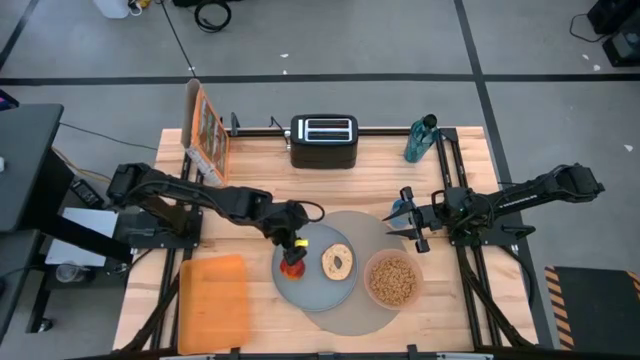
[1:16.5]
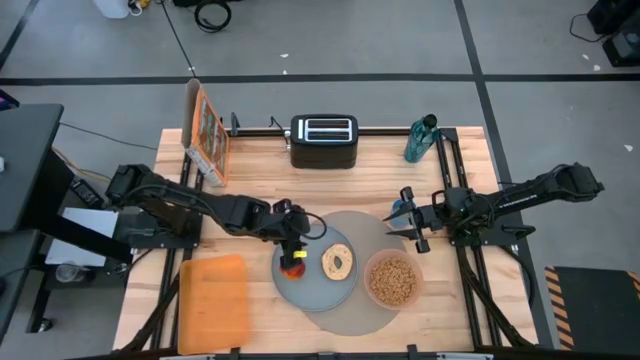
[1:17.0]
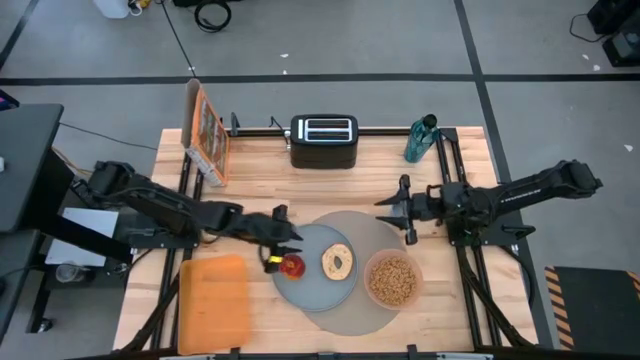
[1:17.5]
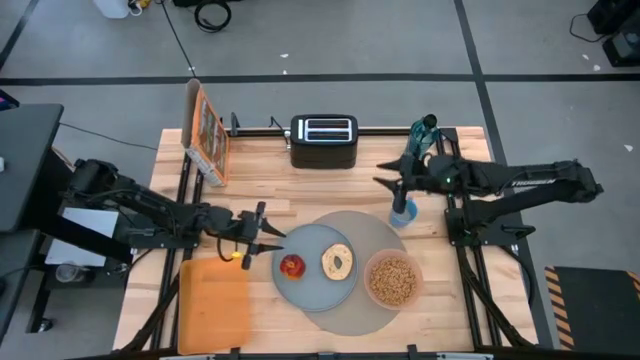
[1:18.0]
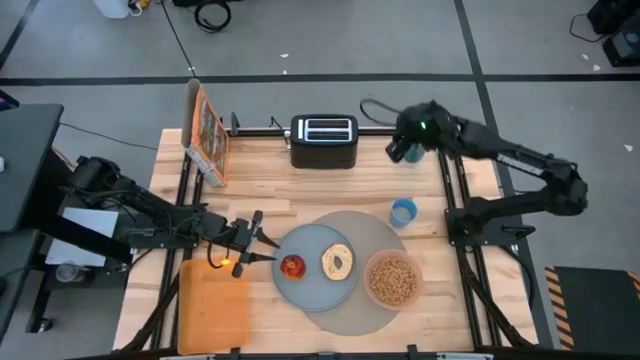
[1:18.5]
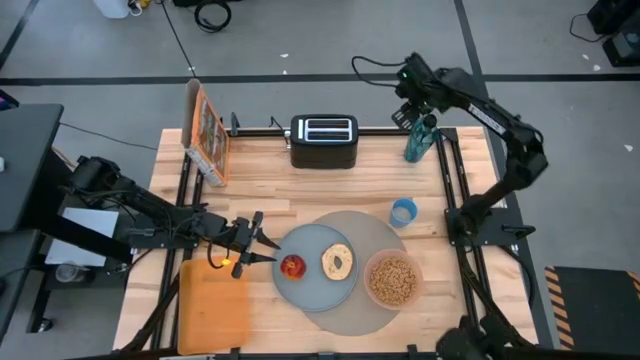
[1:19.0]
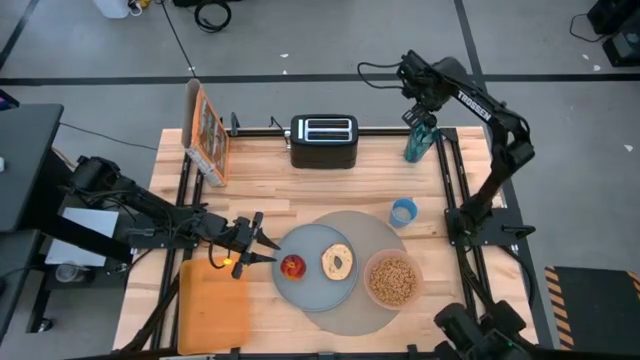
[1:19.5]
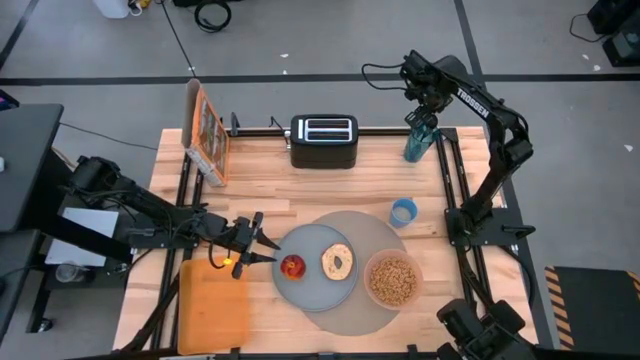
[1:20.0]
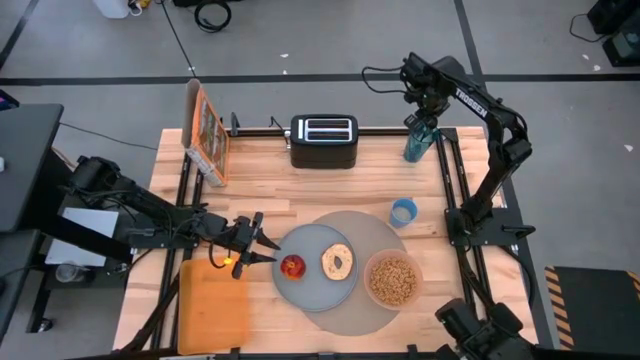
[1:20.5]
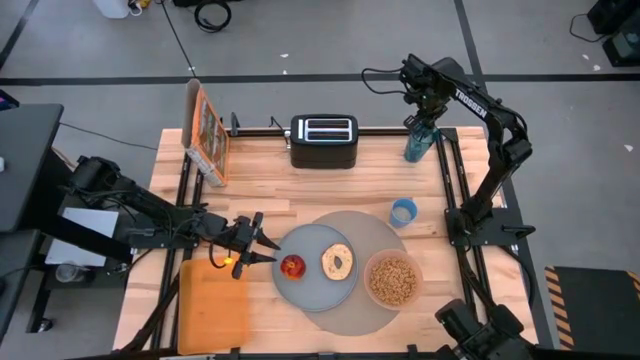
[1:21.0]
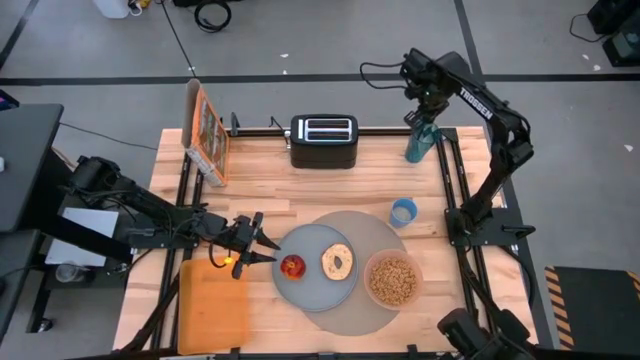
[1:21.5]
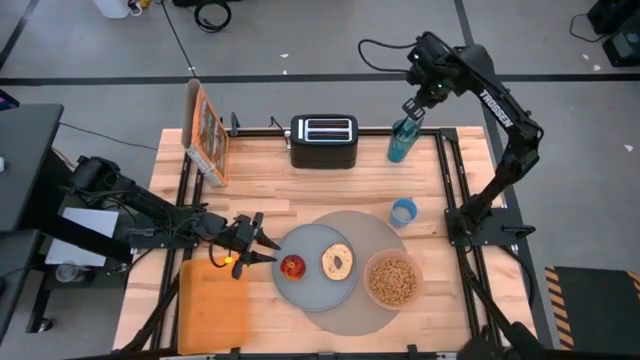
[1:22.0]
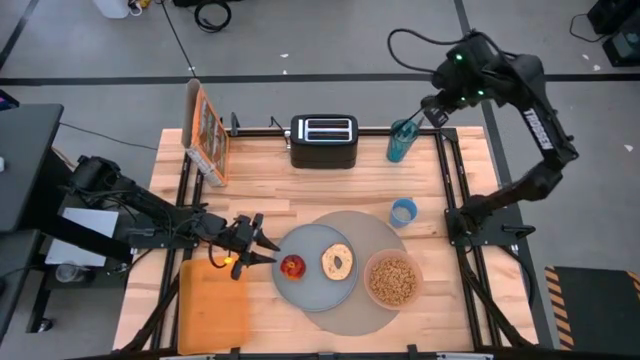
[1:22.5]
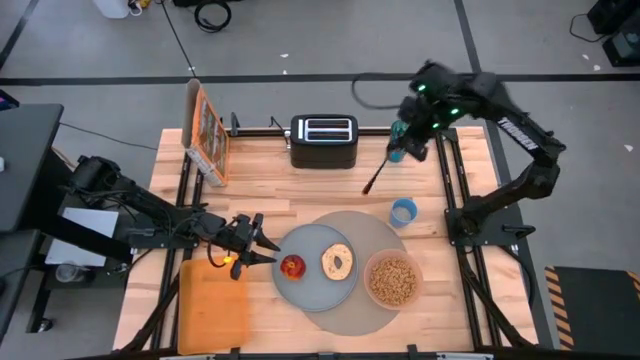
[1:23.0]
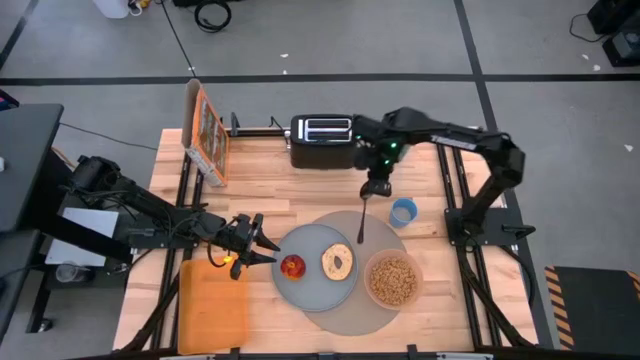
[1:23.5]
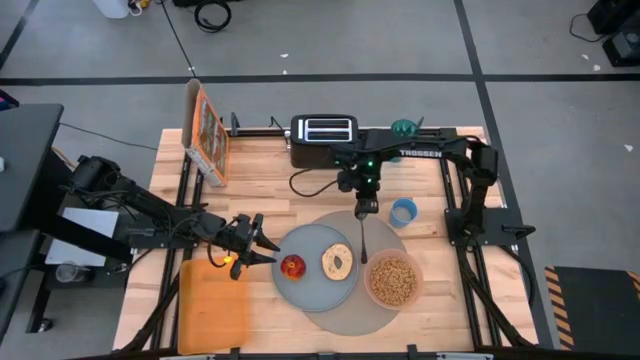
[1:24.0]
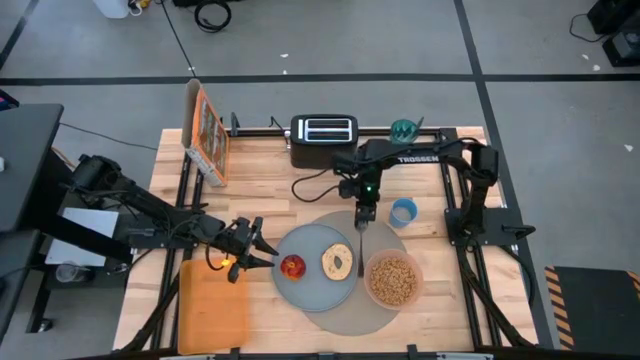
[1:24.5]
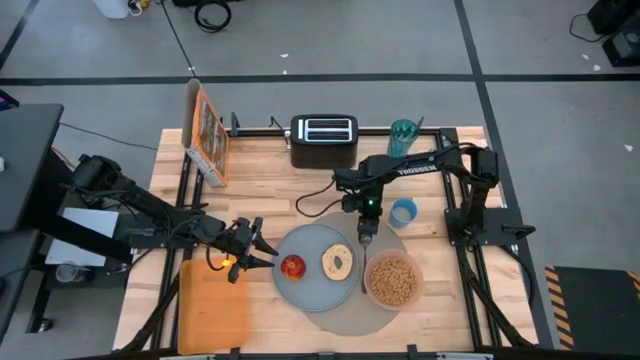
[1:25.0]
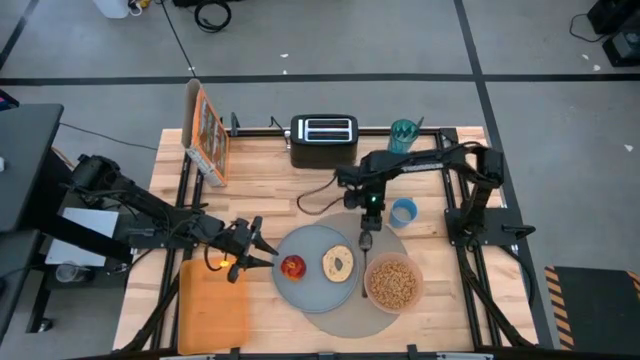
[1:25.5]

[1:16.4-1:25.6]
Task: Arrange a breakfast setting
Put the spoon in the brown table mat to the right of the grey plate

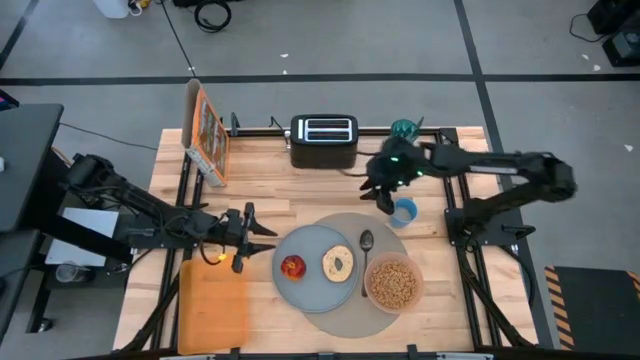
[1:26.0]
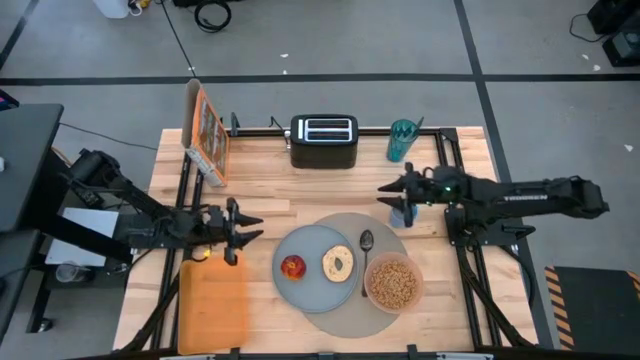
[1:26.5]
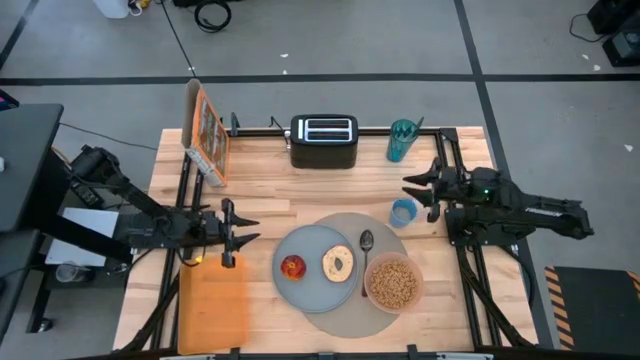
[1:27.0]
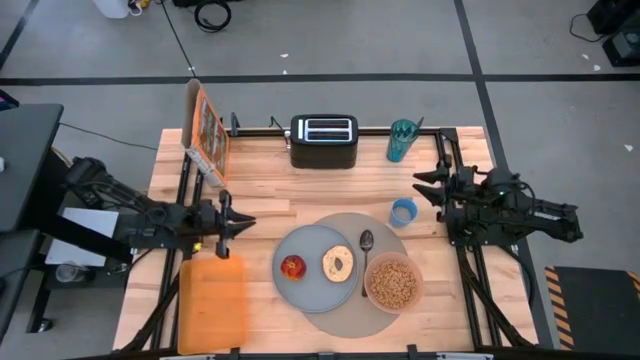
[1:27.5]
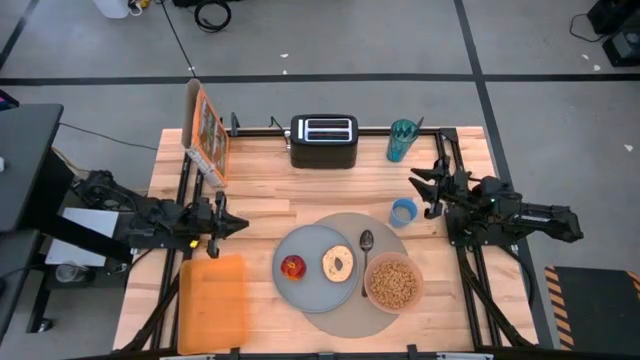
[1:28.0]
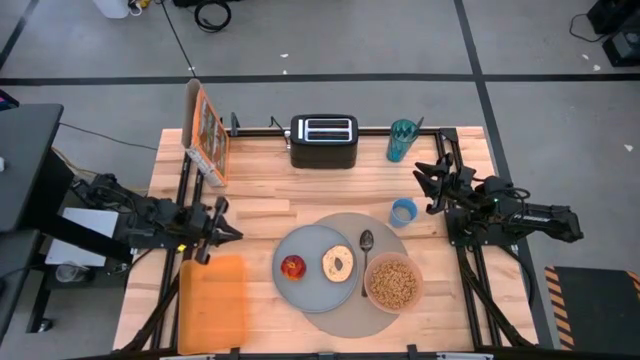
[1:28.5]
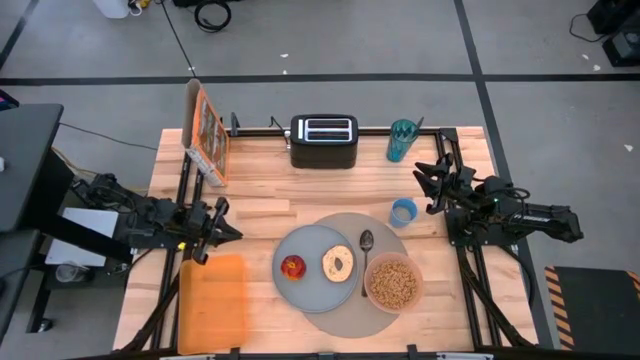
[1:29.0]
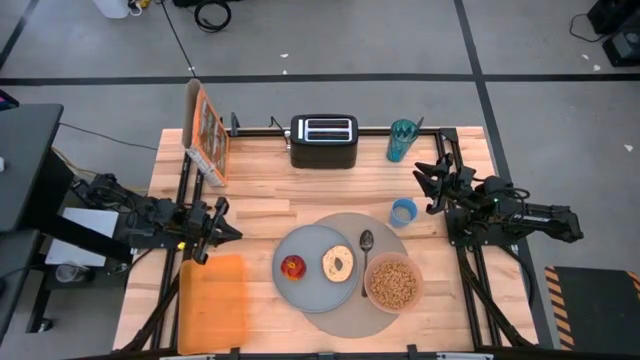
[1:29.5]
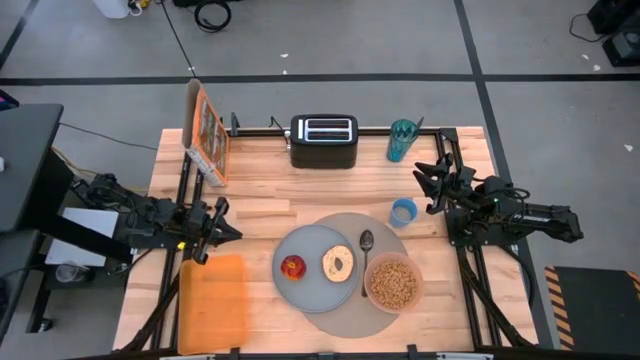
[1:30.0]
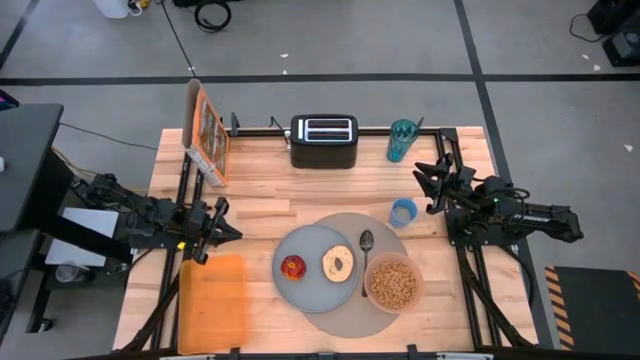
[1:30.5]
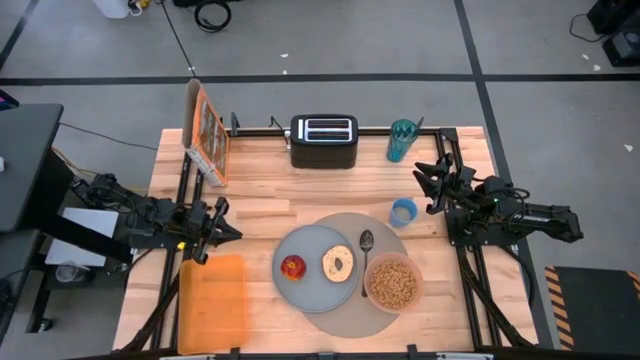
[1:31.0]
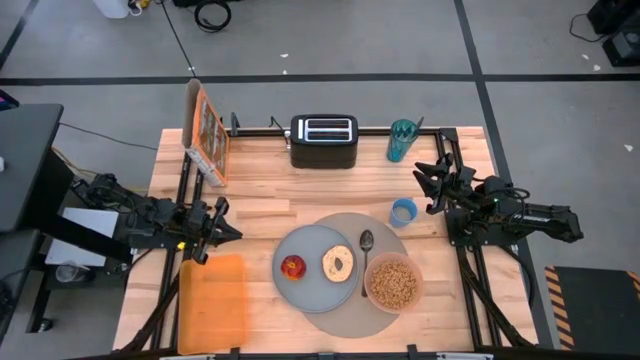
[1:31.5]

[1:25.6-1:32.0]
Return to Home Position

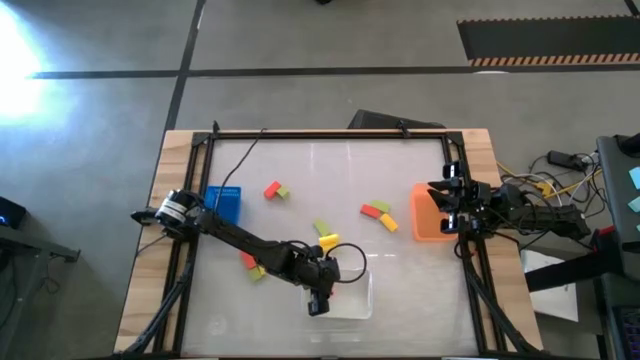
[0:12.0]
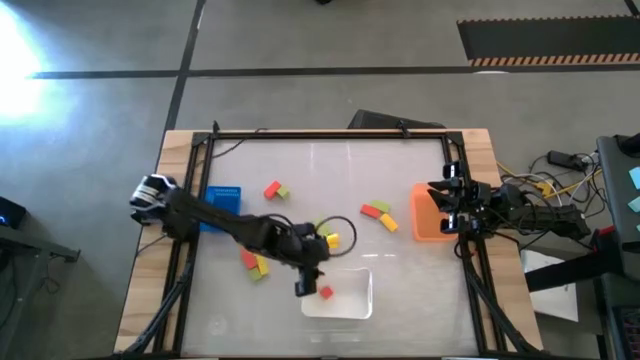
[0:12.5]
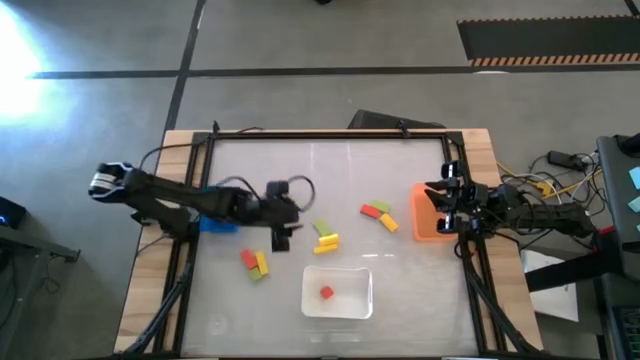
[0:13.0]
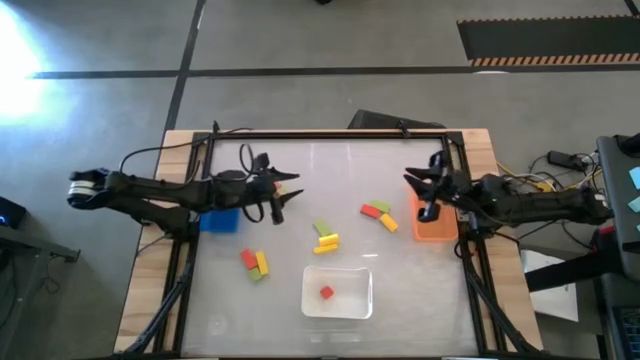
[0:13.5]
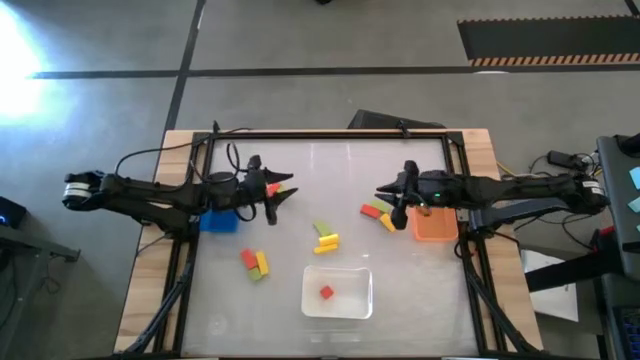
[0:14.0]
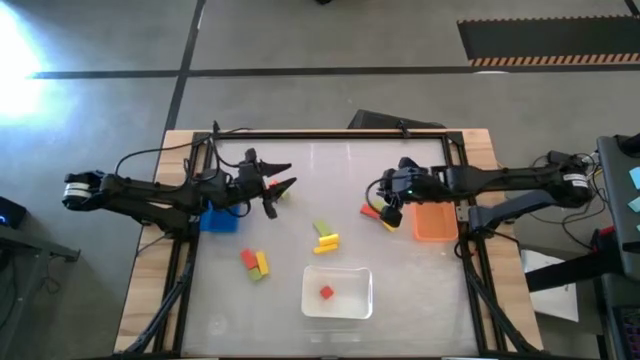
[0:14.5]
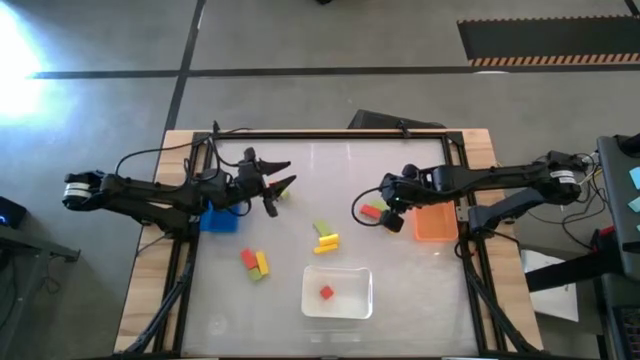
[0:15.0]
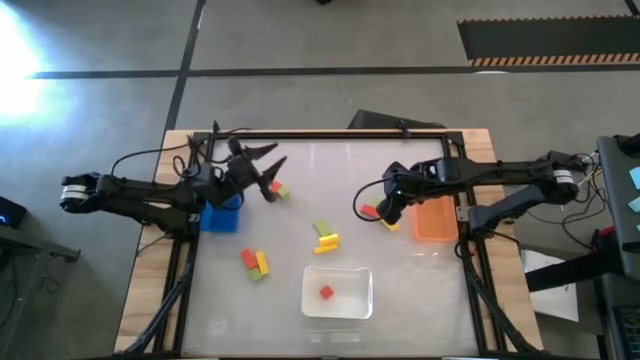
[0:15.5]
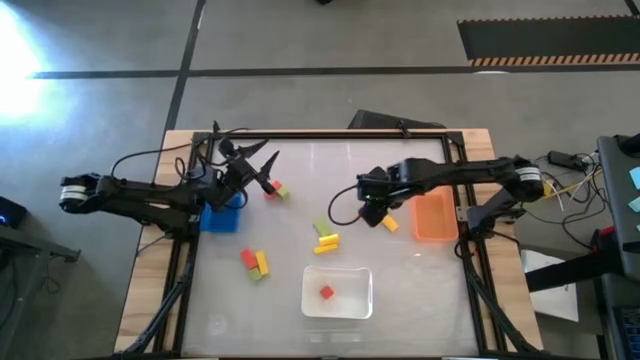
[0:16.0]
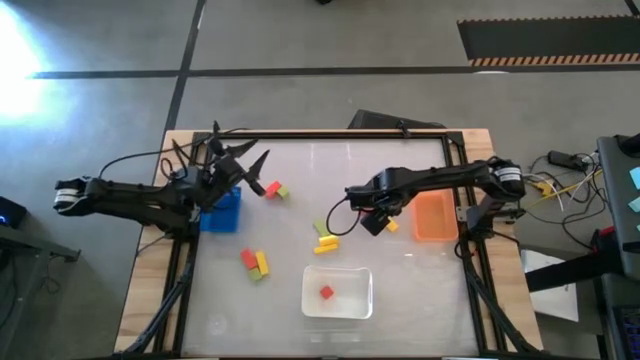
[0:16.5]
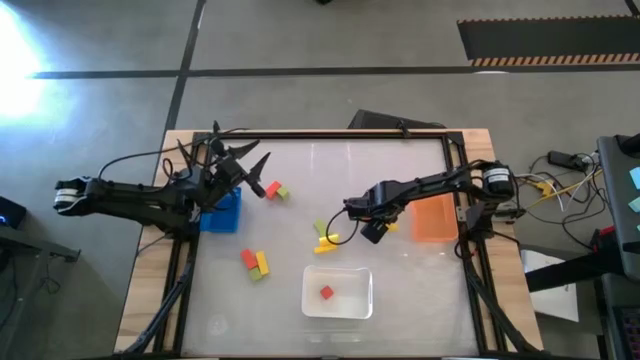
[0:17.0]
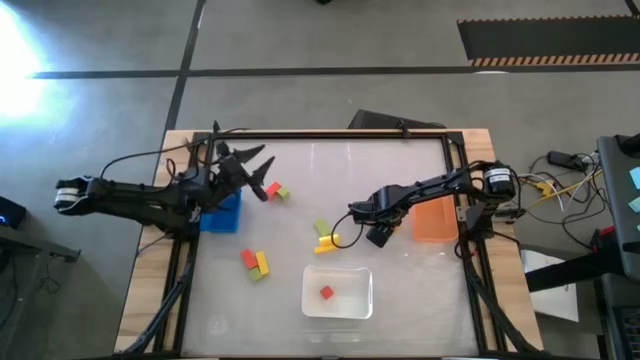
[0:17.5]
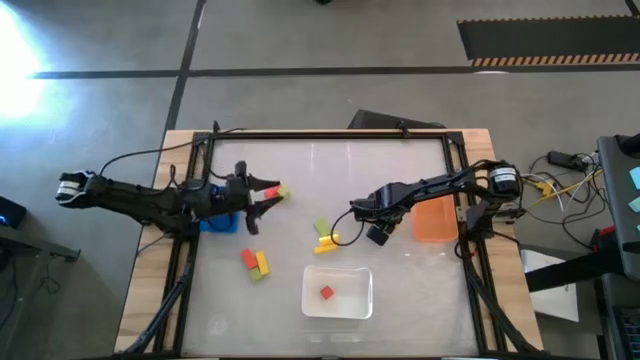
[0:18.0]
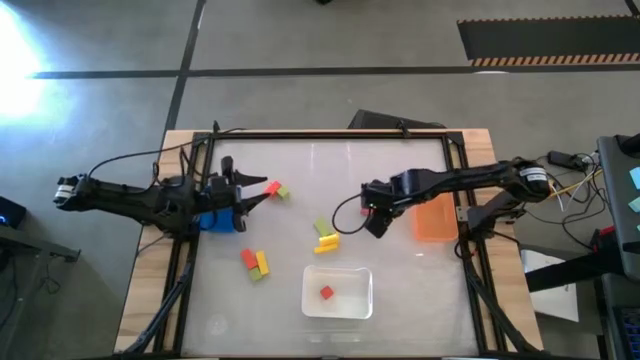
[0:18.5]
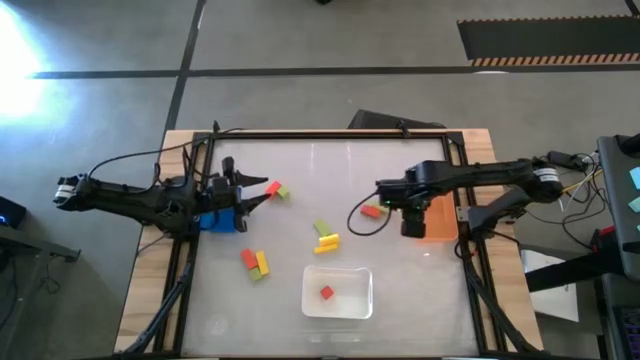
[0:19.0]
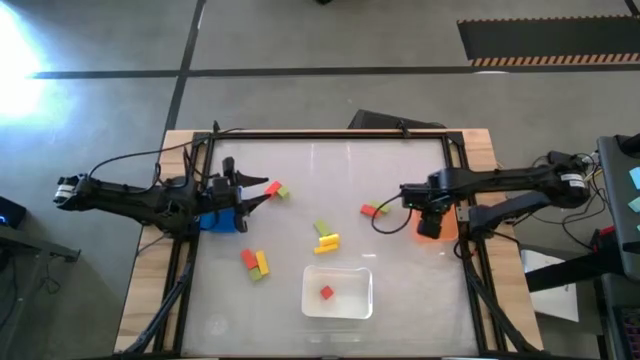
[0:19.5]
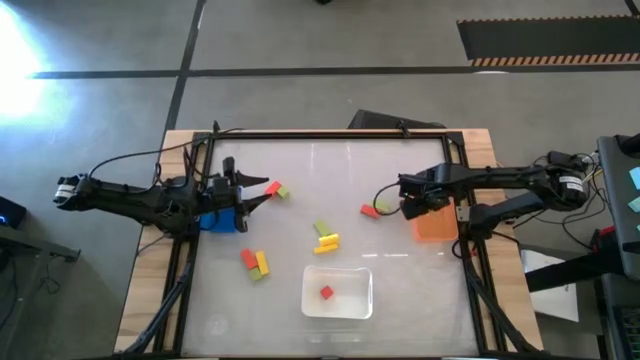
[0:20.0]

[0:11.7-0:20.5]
Task: Sort & place blocks by color
Put the yellow block into the orange bin
